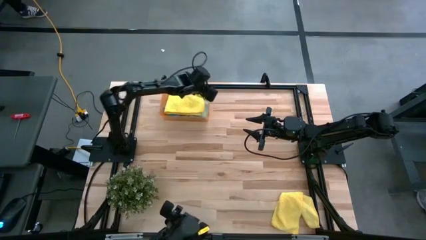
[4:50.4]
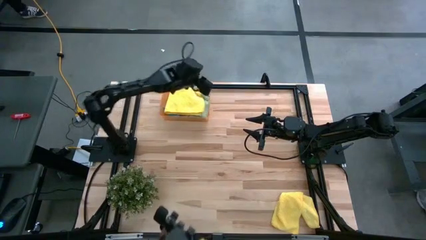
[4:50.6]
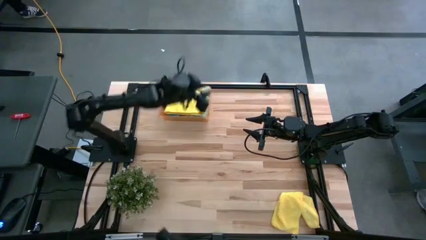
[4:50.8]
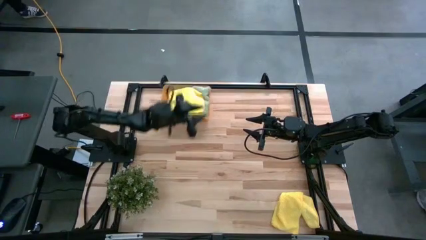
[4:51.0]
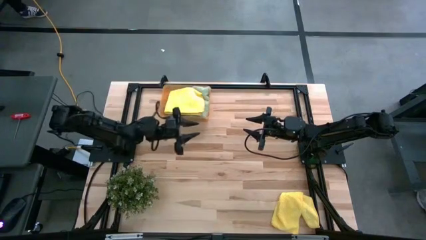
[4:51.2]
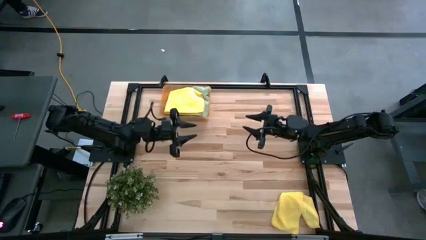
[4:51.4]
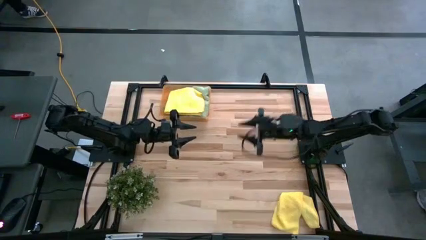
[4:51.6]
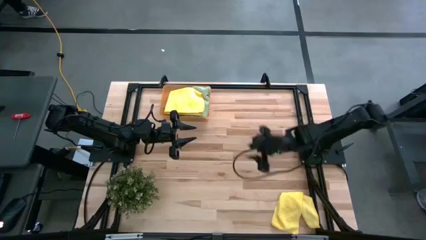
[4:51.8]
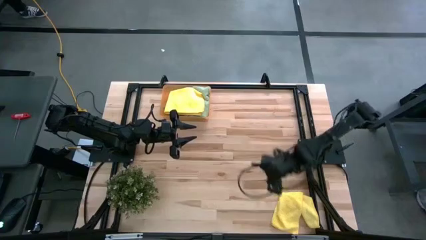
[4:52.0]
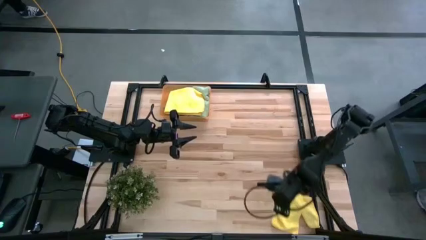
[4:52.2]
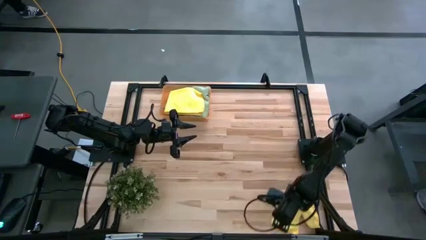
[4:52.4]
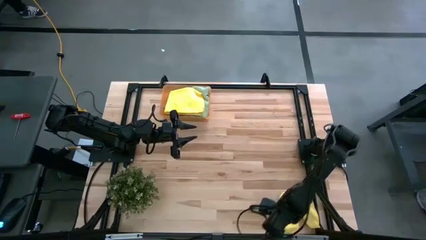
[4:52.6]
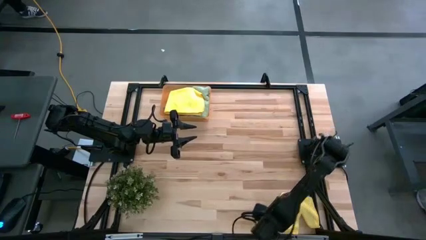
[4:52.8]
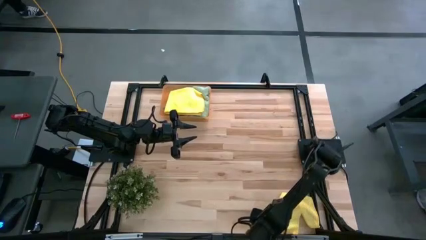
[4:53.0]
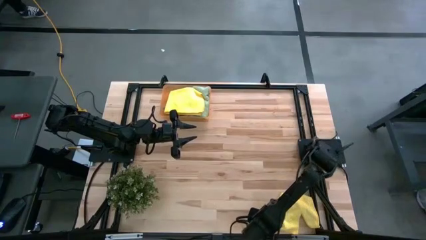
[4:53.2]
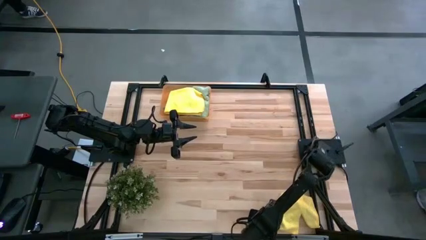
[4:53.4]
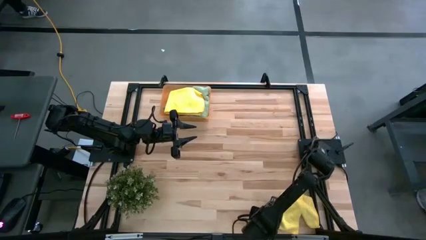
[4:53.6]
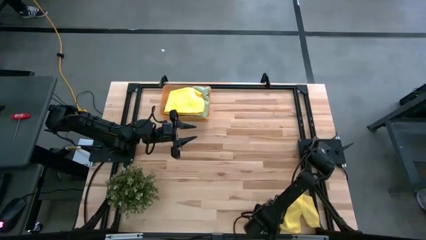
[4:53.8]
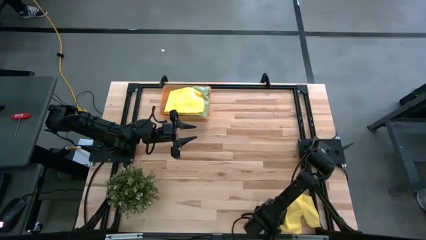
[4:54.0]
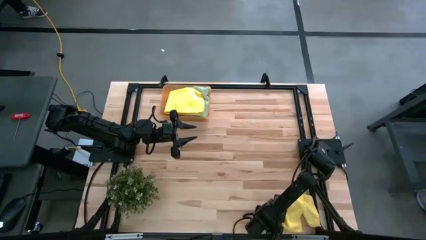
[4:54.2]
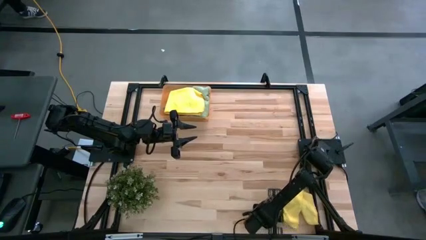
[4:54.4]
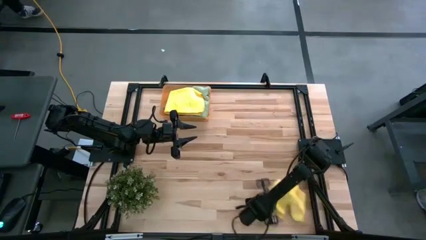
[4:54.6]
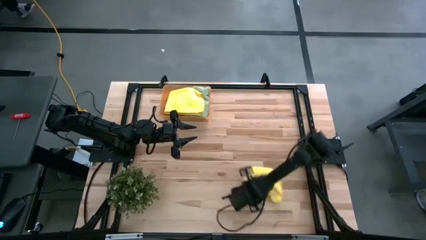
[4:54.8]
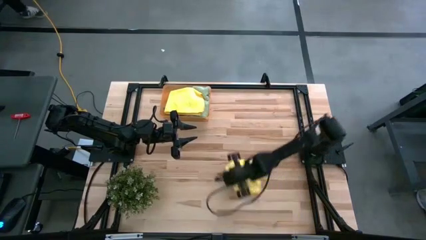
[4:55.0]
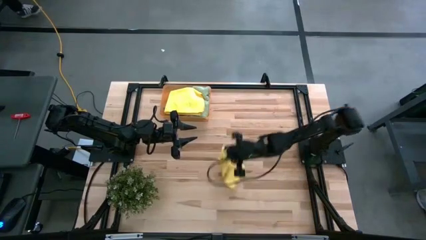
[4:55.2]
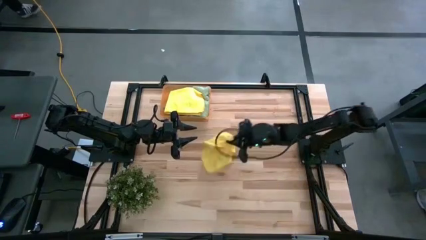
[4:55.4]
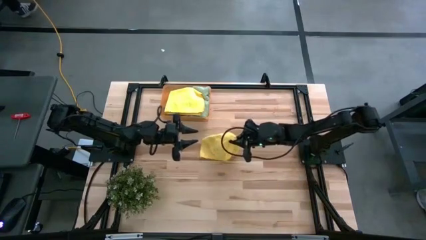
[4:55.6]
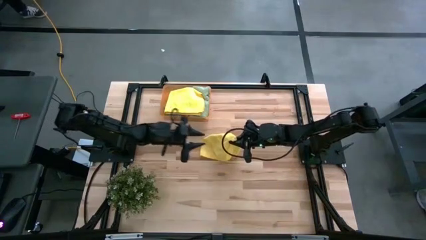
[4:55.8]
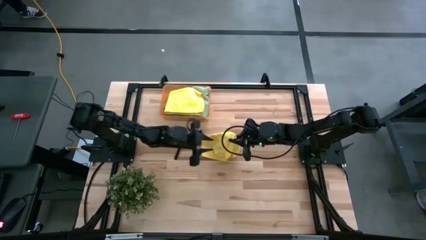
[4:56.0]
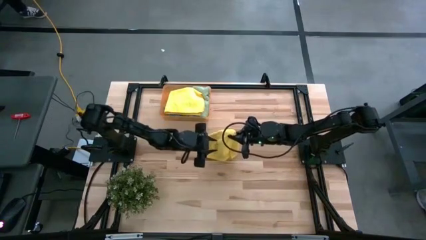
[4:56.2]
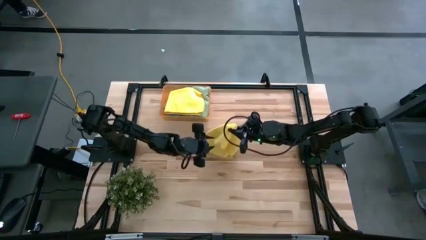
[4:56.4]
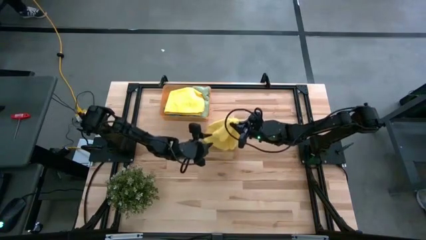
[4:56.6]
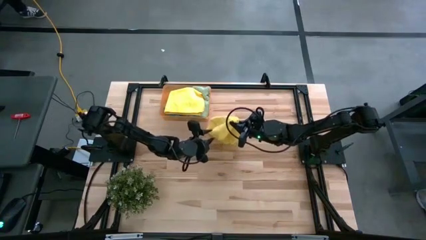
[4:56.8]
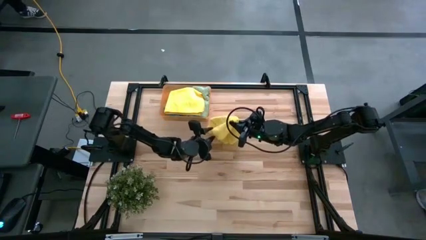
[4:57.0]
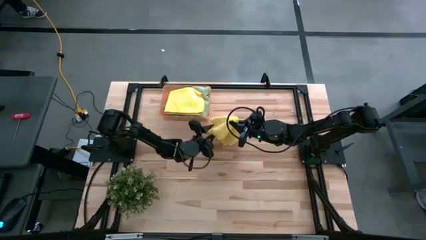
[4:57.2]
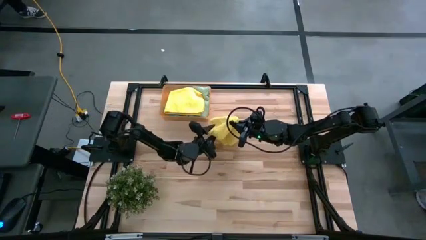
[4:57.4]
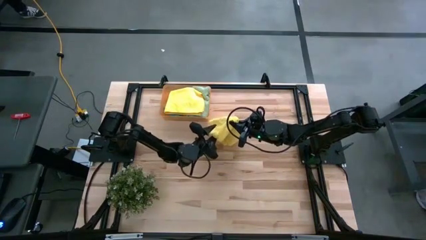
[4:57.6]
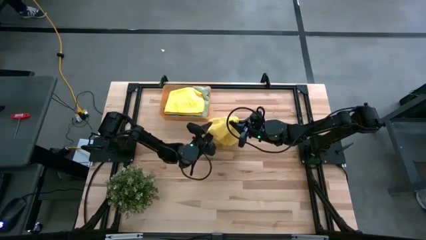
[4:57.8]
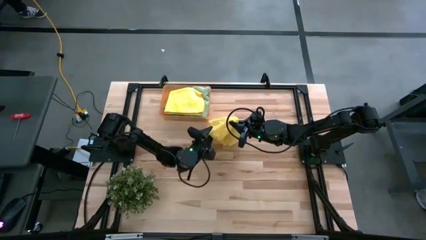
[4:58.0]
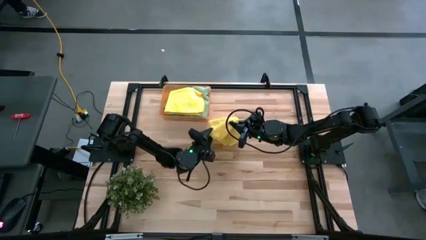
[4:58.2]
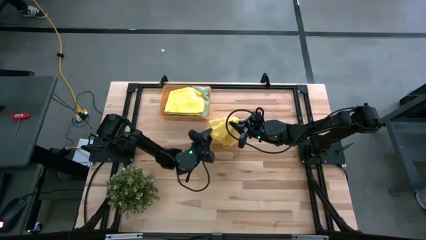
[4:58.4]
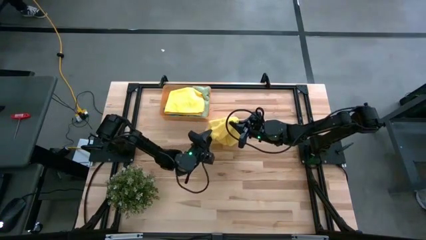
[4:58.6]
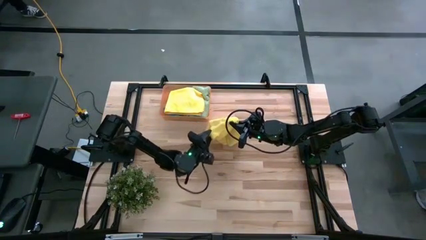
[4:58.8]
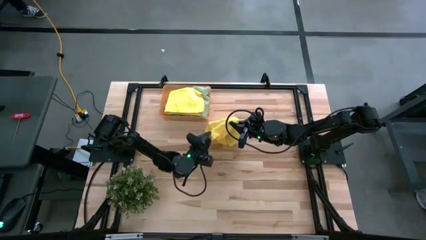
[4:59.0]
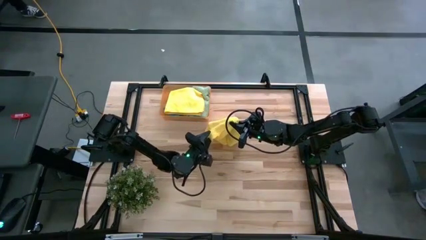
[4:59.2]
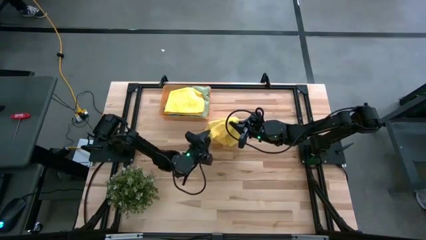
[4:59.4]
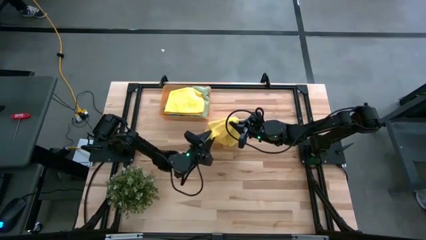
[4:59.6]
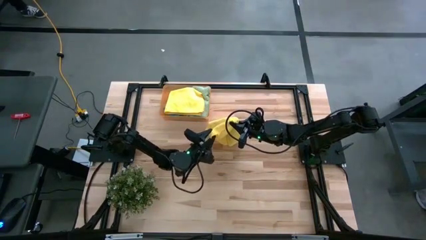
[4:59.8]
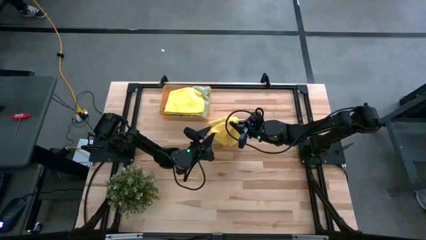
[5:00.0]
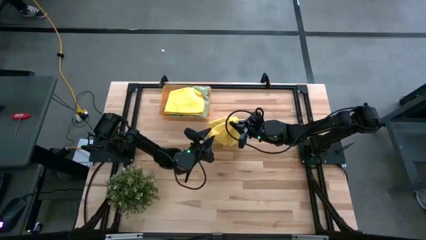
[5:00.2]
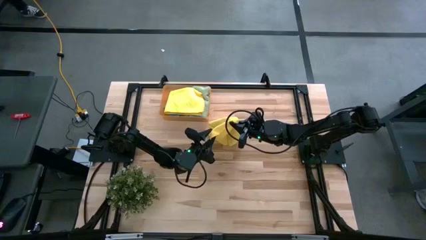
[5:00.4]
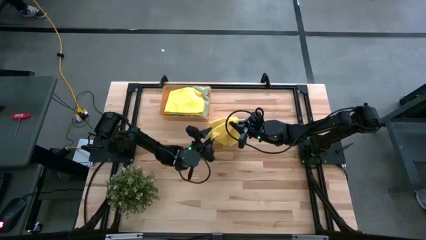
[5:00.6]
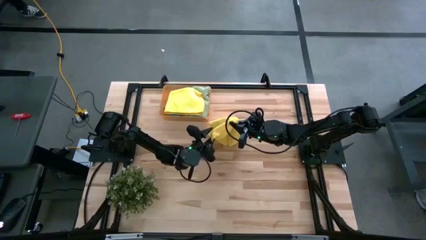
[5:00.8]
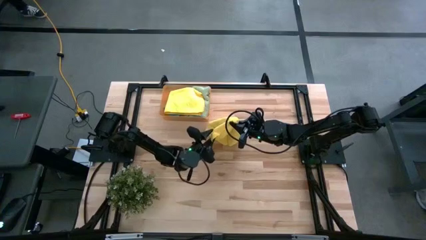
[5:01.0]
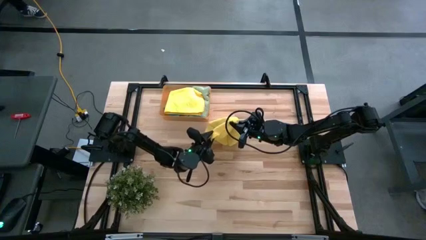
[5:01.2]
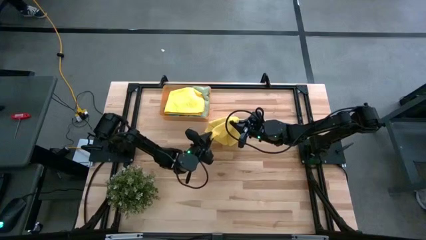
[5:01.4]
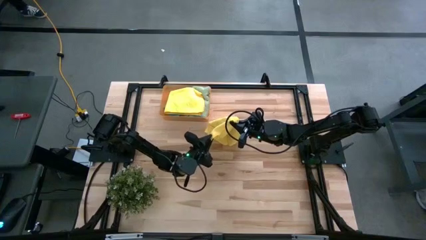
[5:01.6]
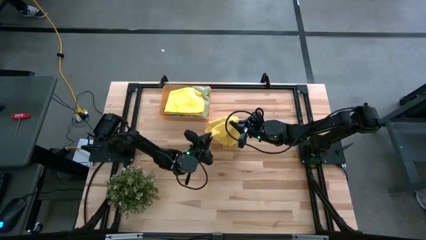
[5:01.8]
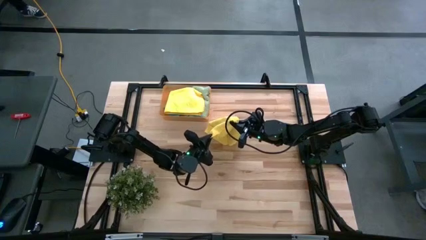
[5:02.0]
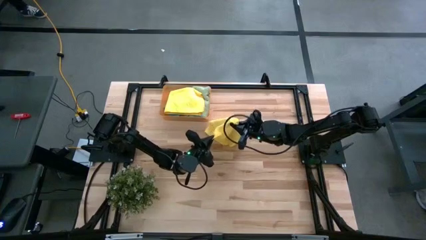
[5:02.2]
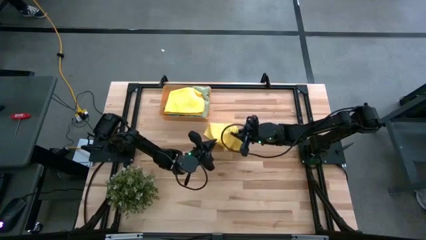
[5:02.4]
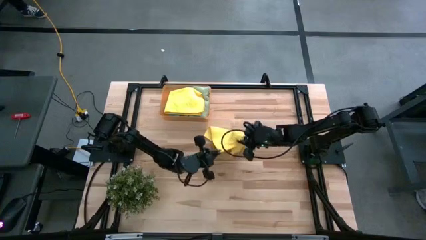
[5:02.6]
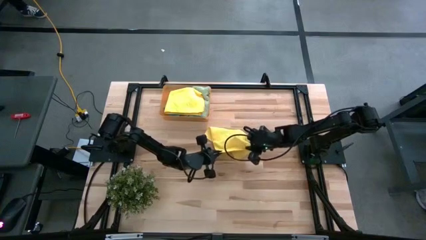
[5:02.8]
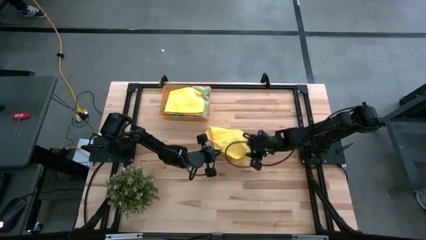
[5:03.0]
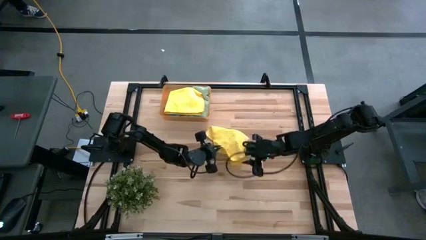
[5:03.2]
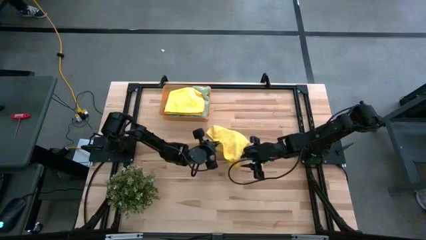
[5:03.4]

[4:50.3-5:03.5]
Task: Fold microfiber towels
Fold the yellow microfiber cloth
